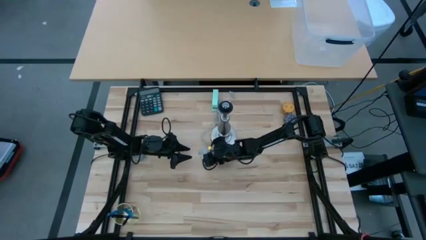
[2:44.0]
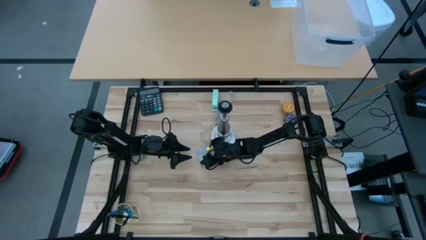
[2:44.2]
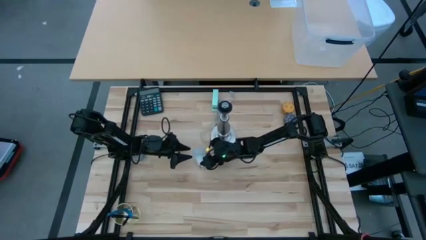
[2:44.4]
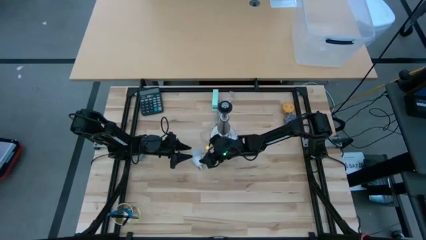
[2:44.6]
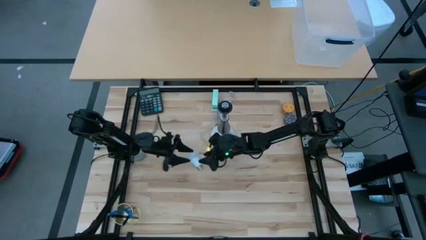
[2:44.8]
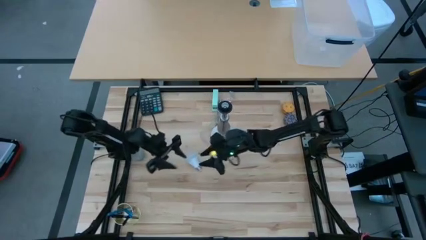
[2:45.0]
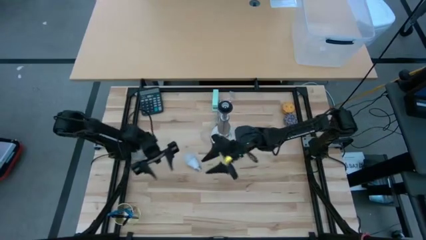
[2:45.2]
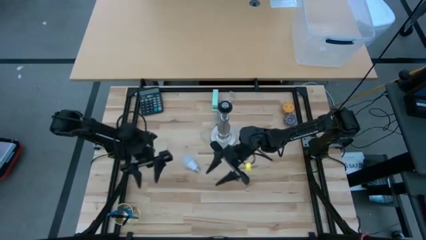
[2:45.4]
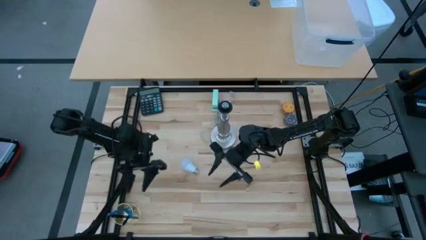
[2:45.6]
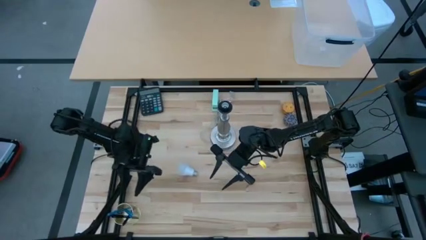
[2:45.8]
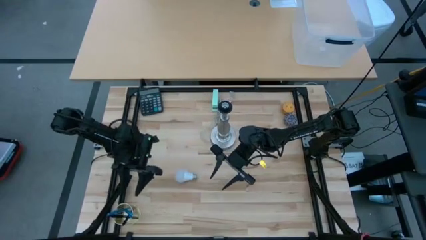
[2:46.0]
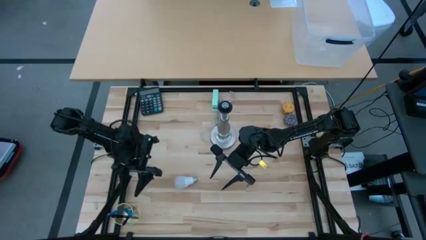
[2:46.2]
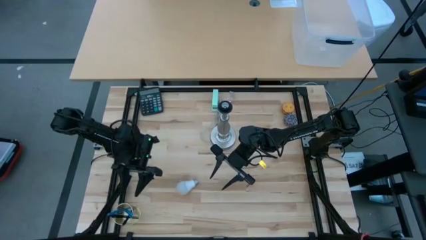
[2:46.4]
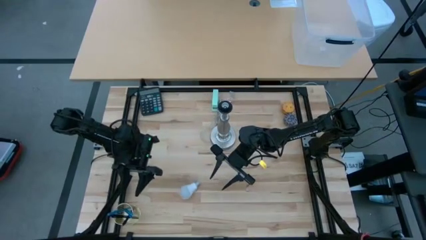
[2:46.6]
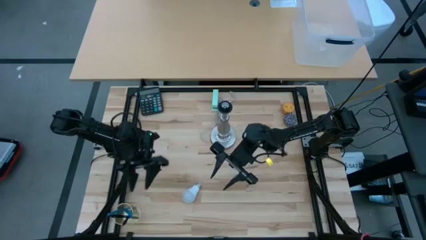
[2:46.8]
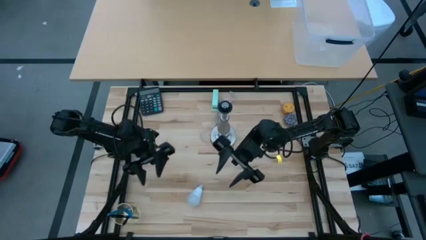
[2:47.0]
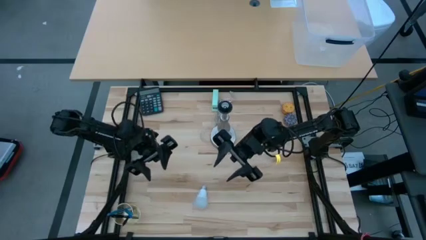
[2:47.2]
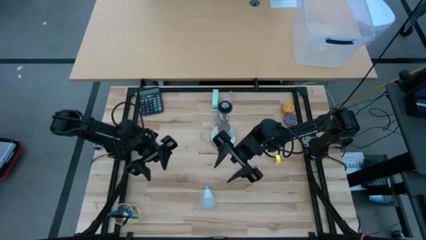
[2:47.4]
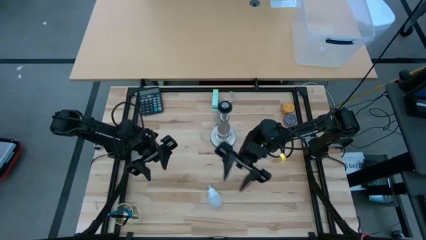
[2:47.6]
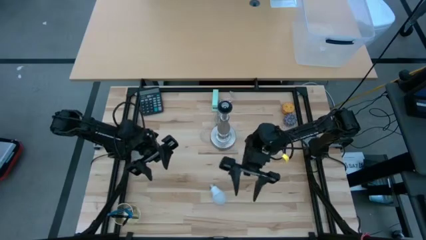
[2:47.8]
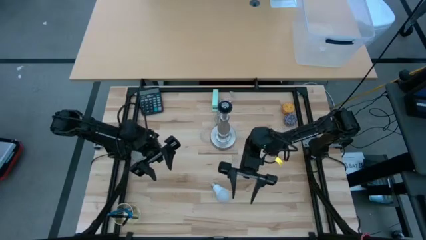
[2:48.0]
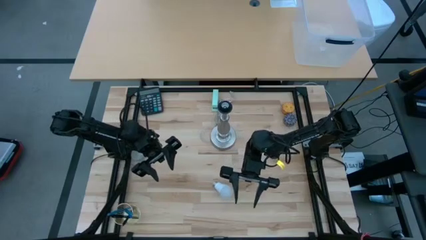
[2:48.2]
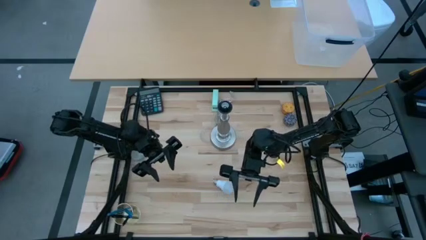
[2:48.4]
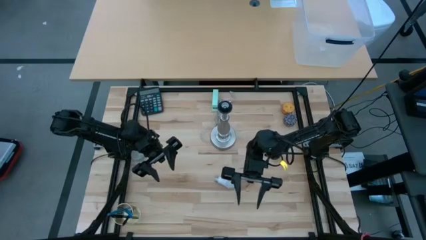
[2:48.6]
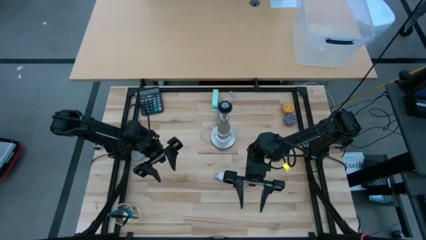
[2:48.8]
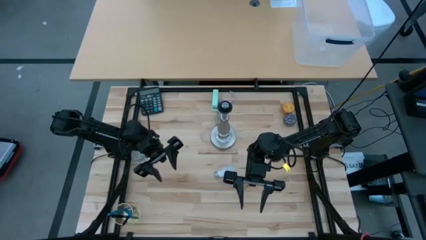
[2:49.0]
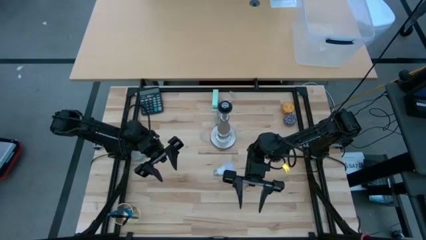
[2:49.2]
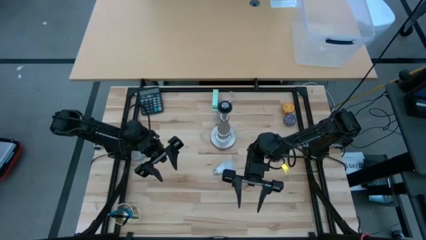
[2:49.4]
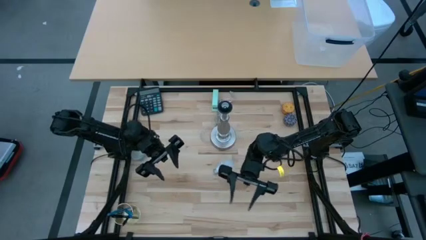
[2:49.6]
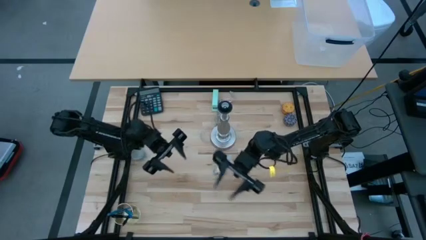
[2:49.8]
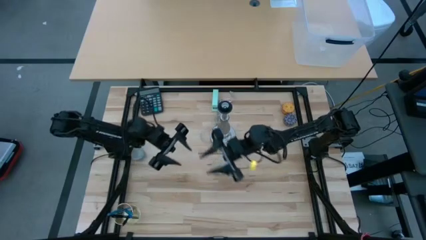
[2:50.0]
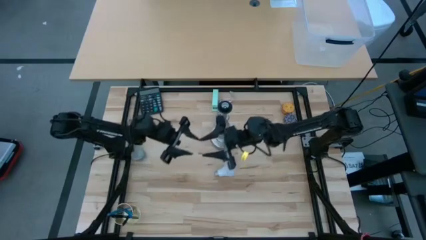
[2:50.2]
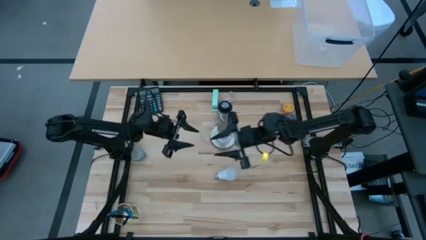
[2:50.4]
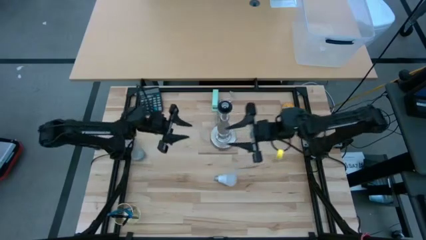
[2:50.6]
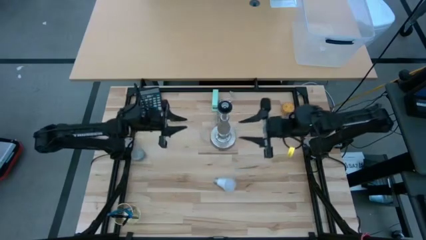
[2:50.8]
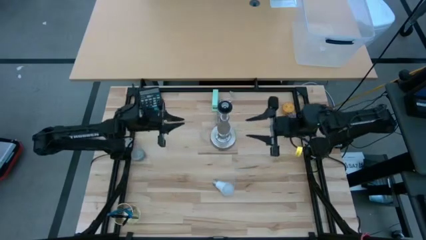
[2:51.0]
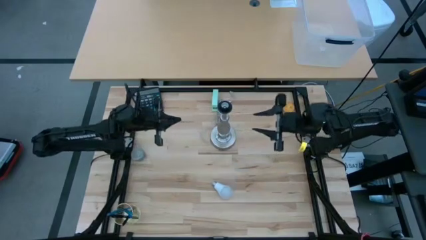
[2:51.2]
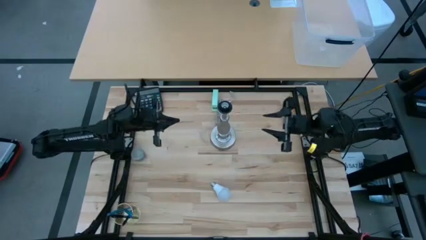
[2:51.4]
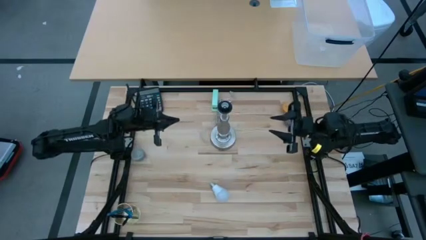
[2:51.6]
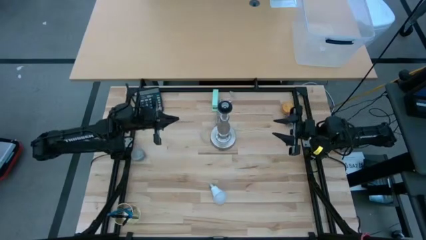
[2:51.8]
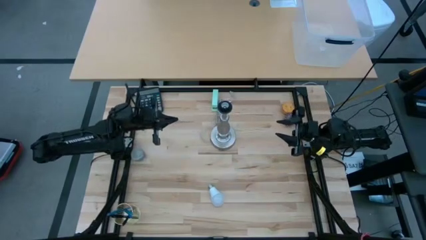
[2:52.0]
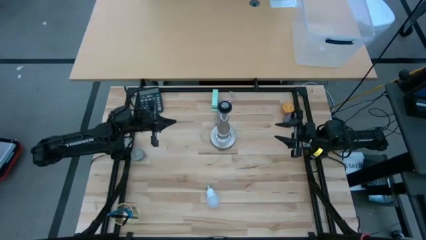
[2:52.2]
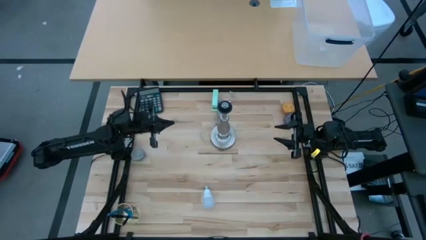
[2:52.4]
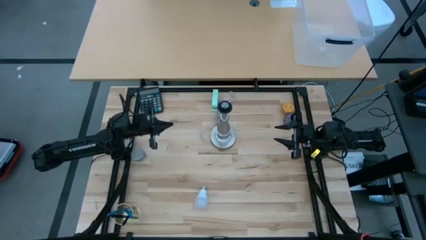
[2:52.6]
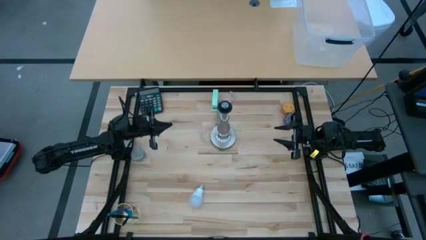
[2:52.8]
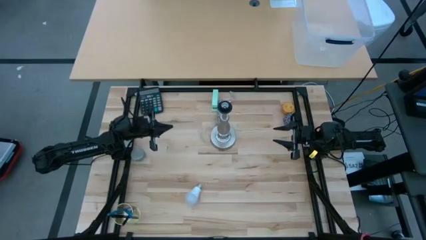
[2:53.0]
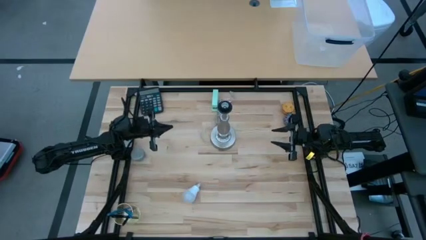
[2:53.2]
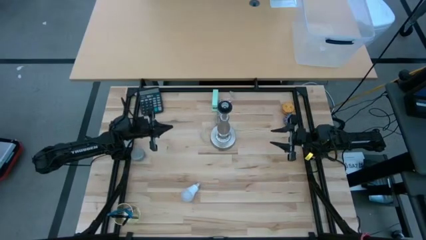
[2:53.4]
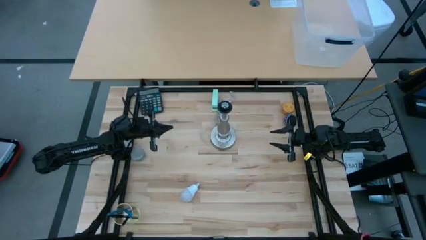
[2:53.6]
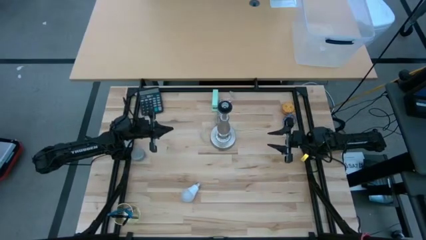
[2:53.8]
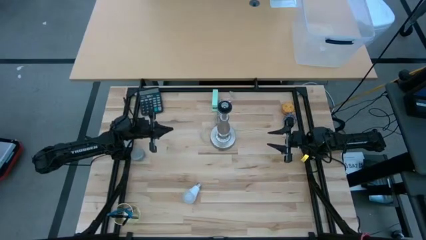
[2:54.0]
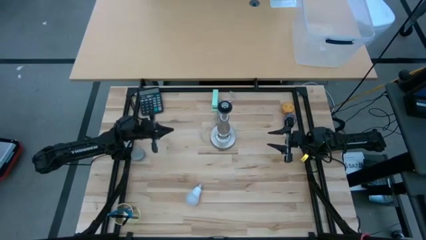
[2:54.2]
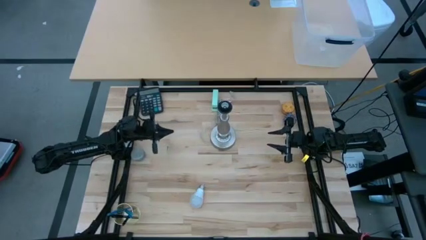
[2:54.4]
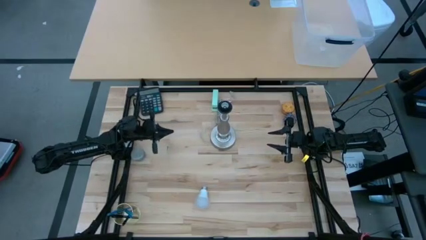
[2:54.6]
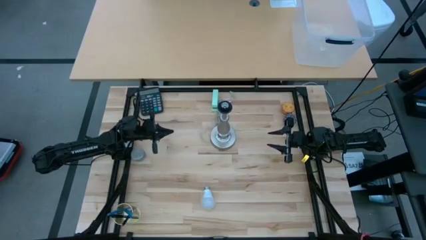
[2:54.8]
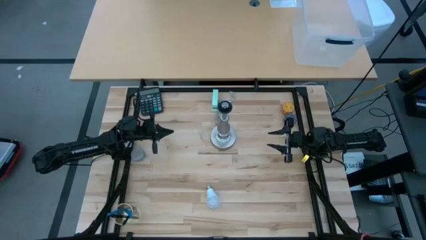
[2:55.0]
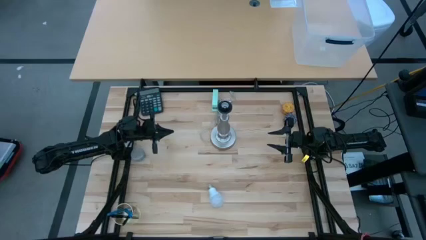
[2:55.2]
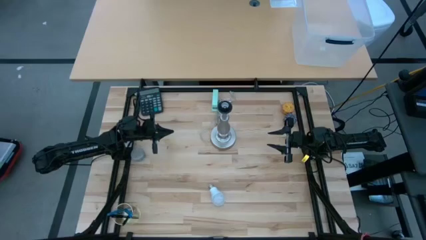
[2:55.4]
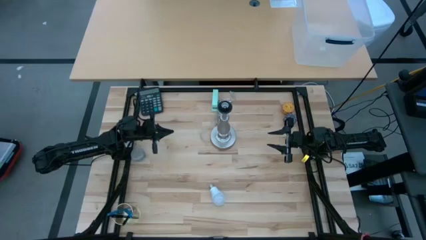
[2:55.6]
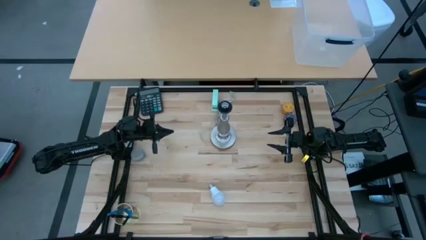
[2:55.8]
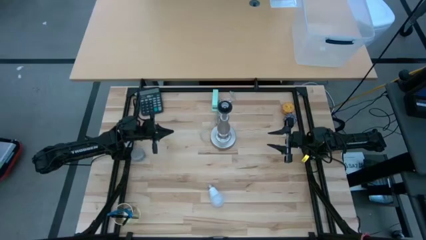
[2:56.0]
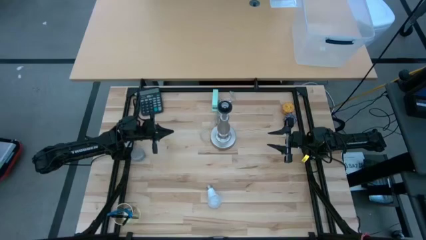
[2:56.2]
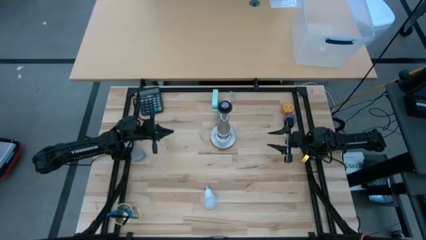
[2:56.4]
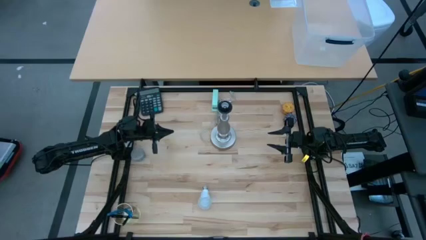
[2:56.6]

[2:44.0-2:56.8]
Task: Screw lightbulb
Return to Home Position

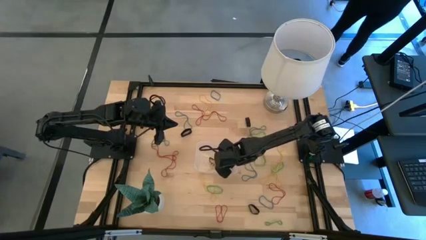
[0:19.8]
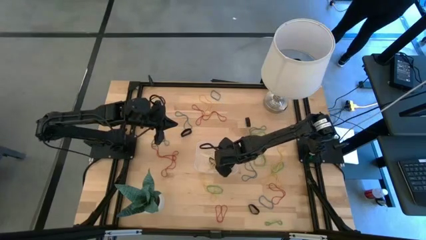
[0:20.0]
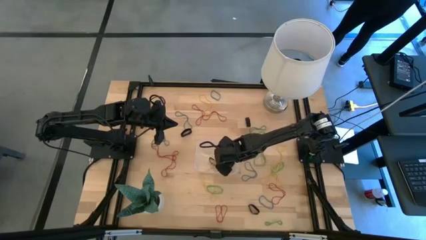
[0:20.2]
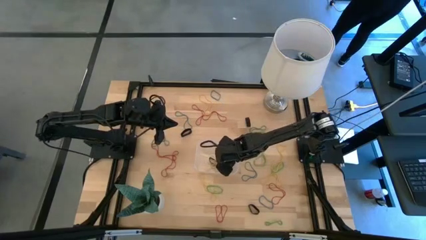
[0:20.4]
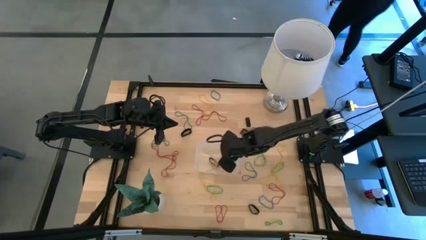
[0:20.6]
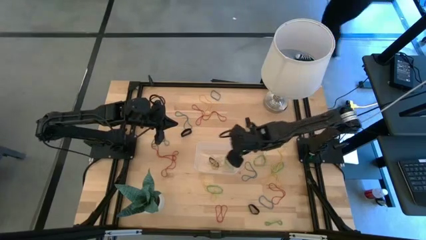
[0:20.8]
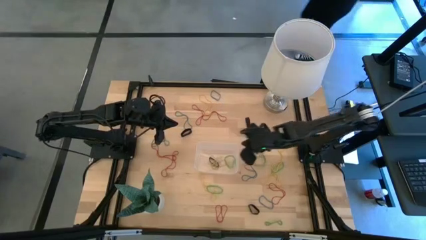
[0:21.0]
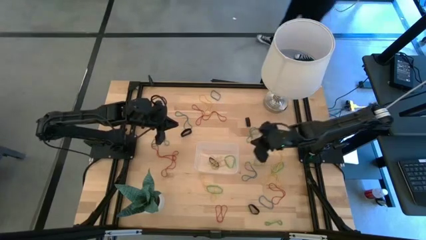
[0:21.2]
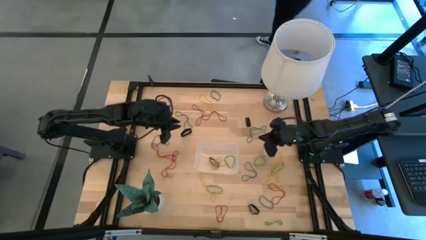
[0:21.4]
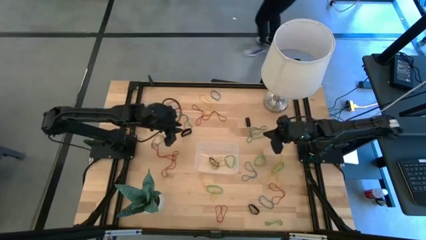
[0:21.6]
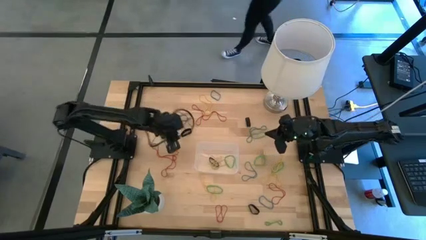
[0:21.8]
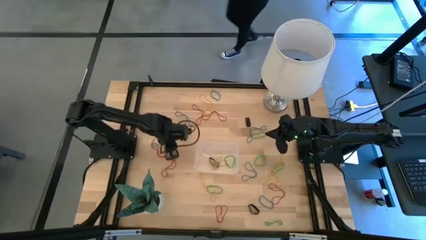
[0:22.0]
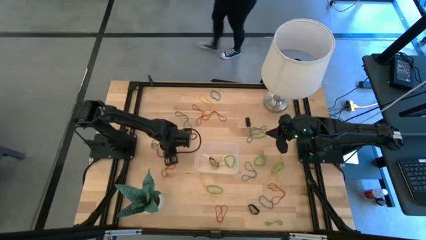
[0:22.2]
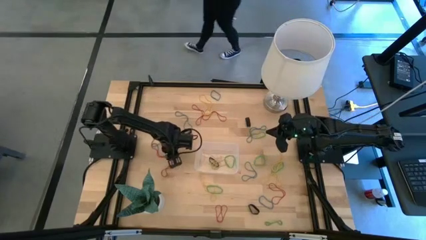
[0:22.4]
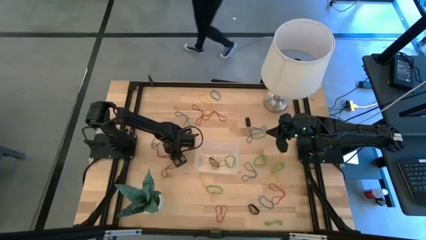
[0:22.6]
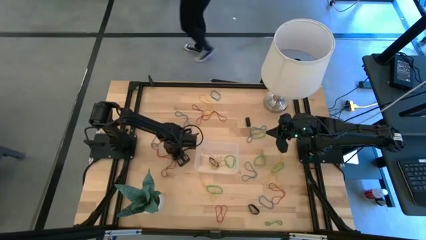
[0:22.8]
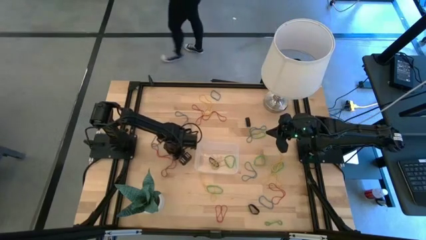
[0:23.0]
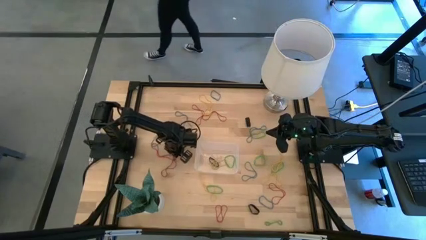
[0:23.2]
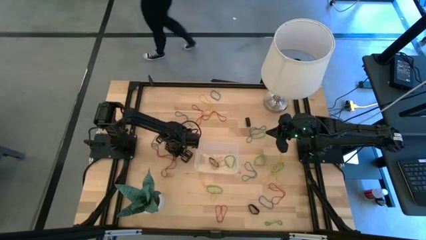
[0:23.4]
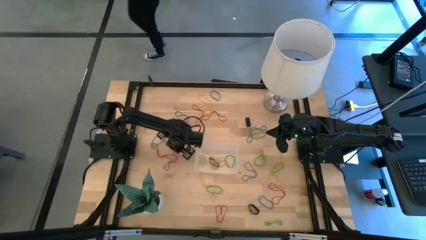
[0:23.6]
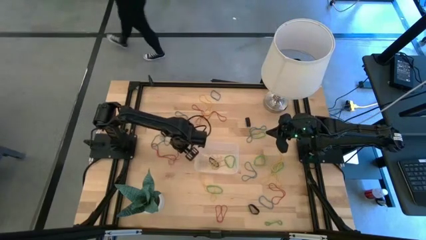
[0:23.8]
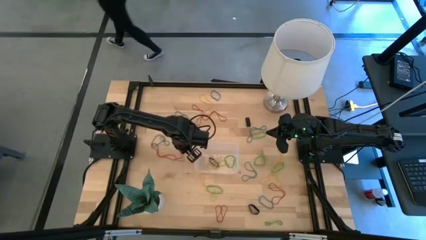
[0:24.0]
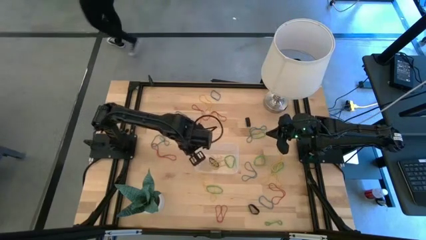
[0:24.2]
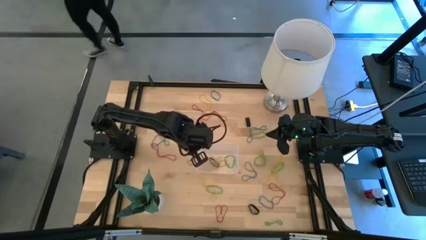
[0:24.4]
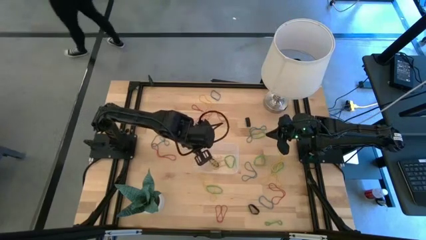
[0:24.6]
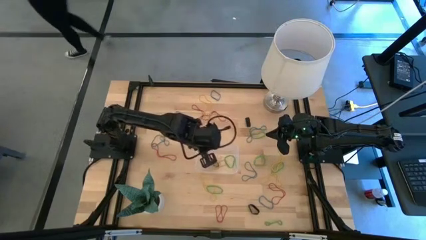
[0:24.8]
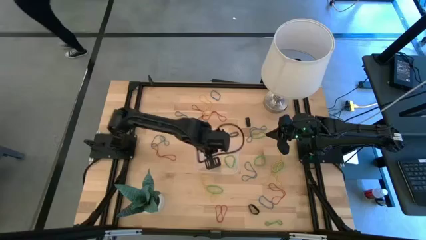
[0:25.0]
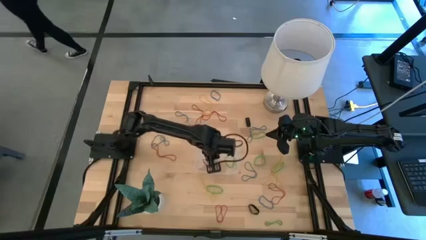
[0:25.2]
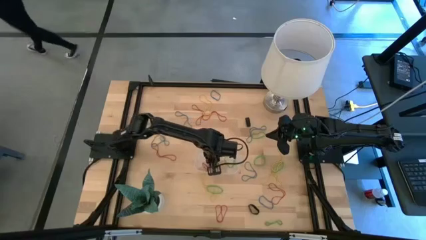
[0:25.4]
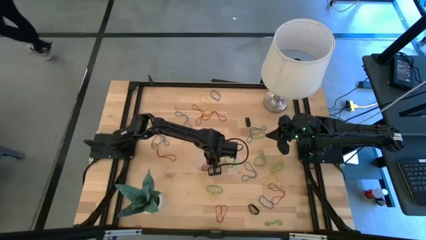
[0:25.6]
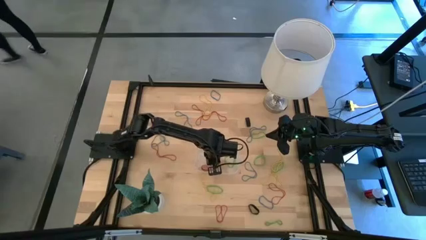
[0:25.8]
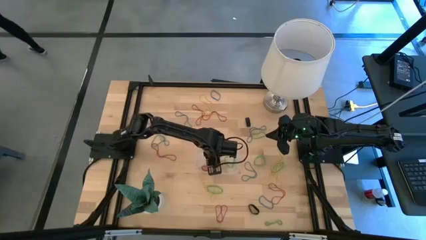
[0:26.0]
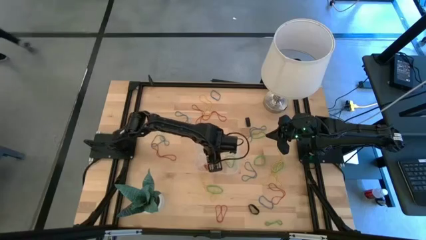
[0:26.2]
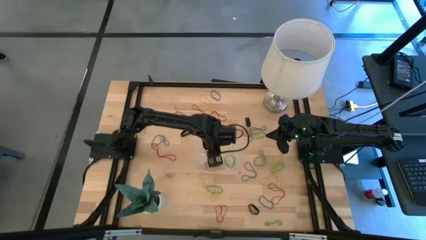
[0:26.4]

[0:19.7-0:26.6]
Task: Pick and place rubber bands into bin
Put the red rubber band into the transparent bin
